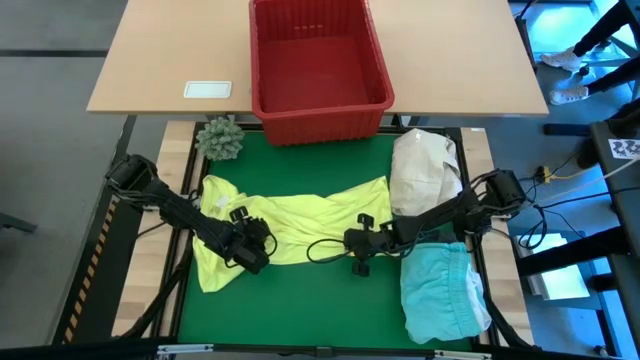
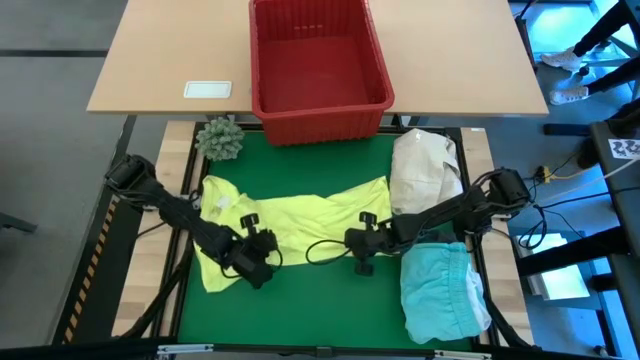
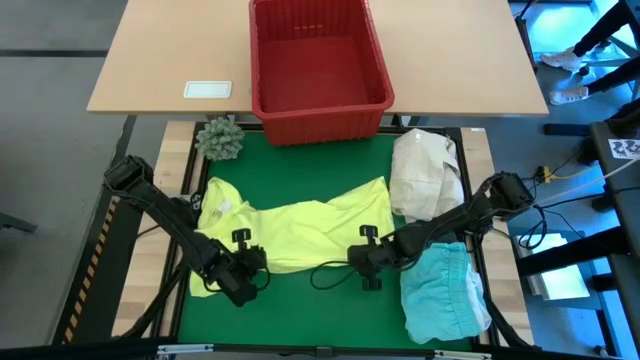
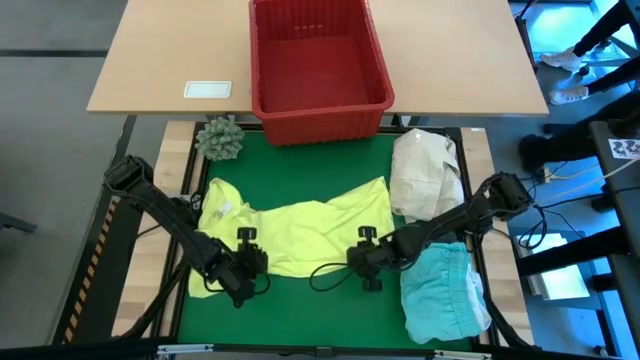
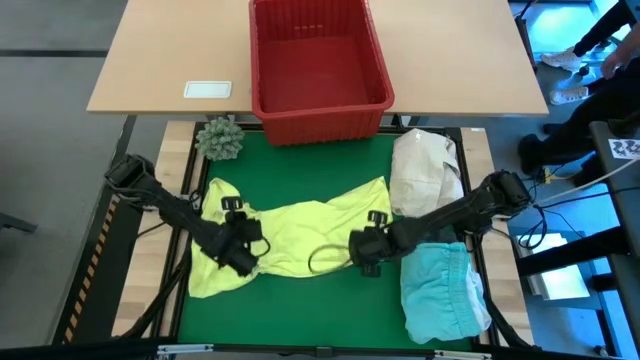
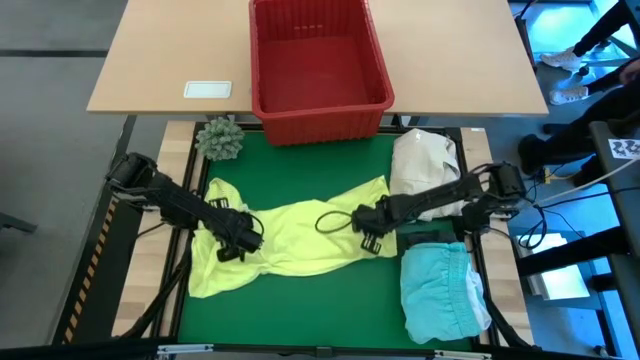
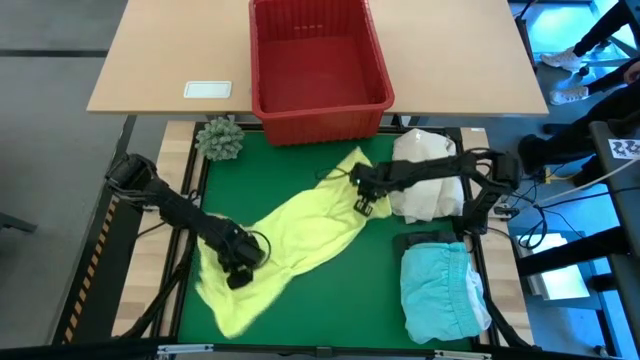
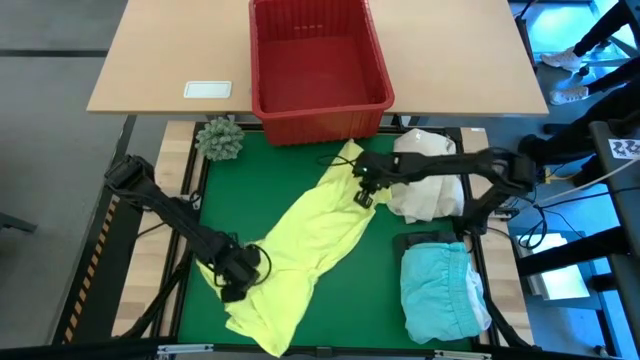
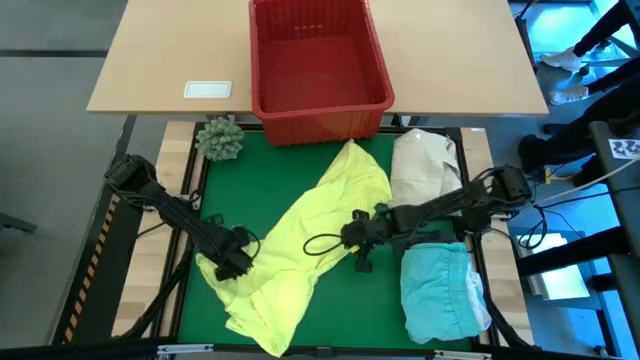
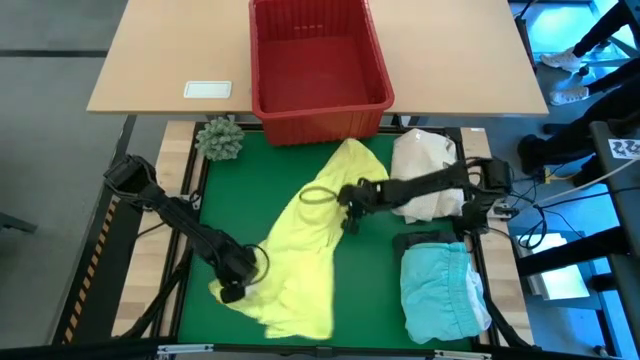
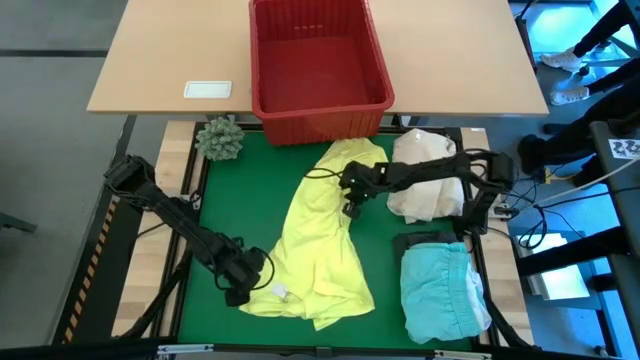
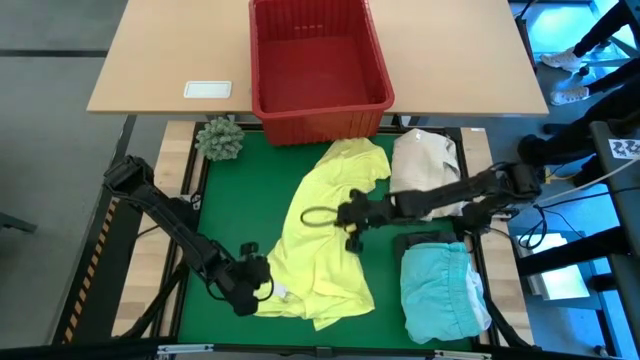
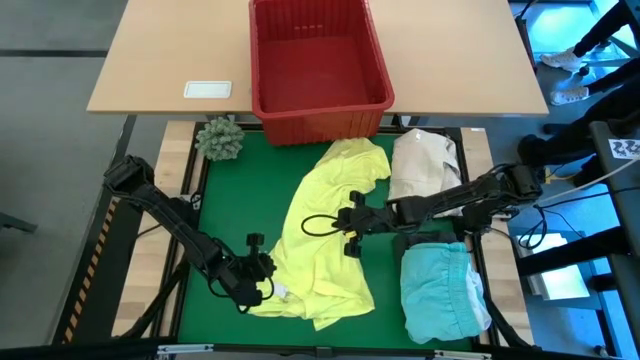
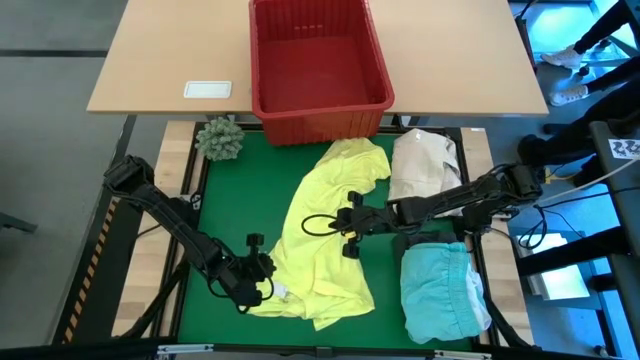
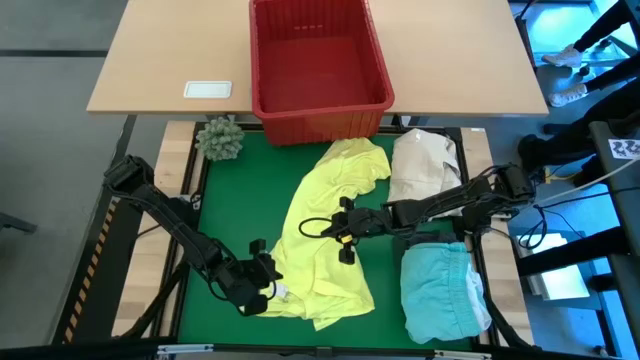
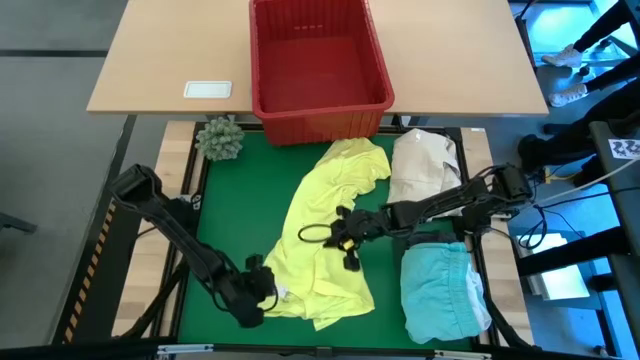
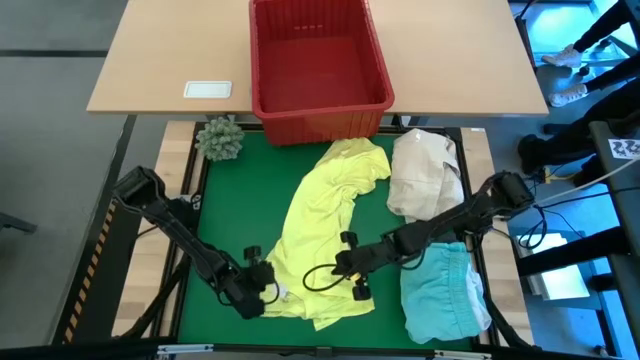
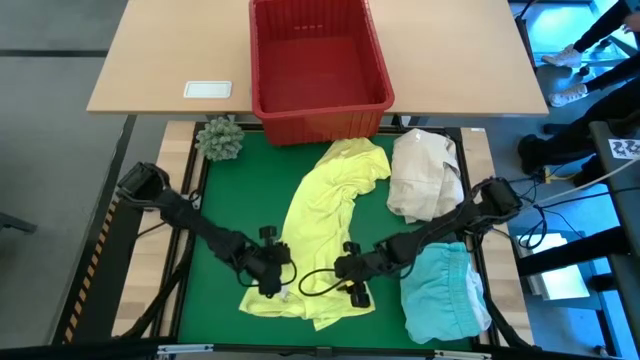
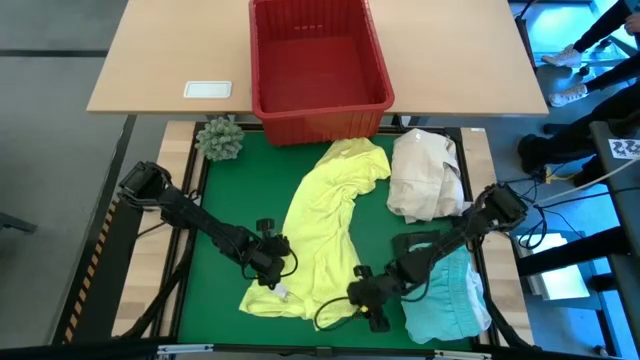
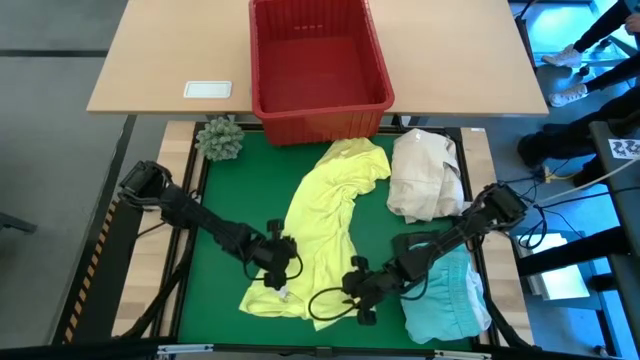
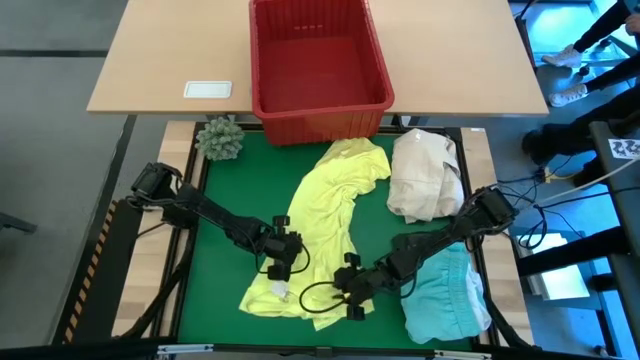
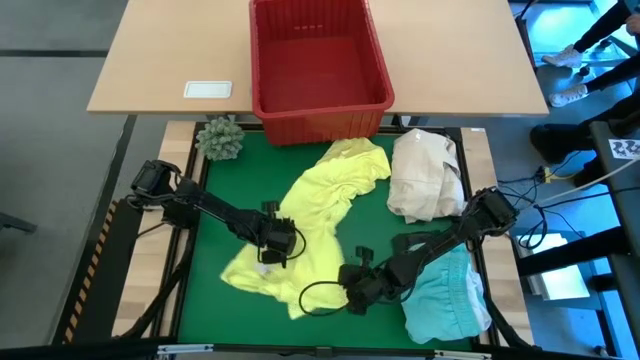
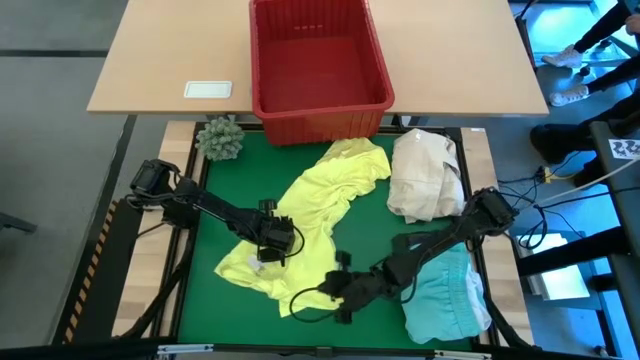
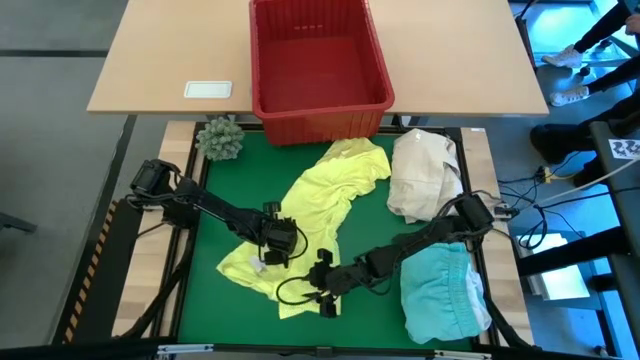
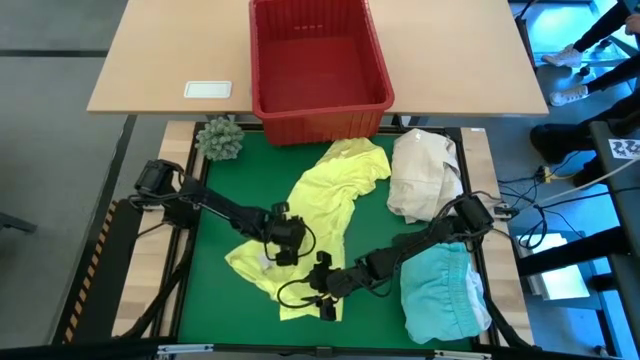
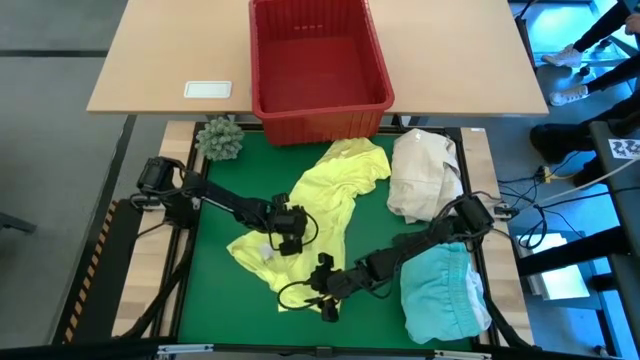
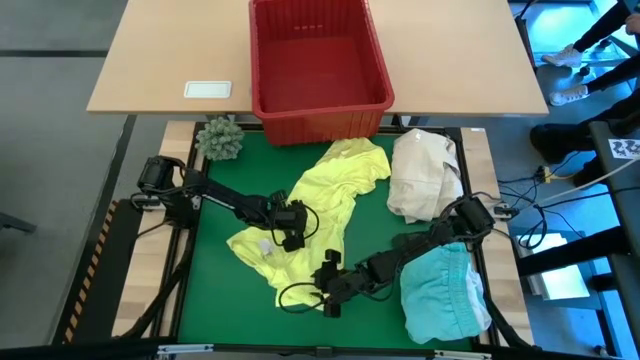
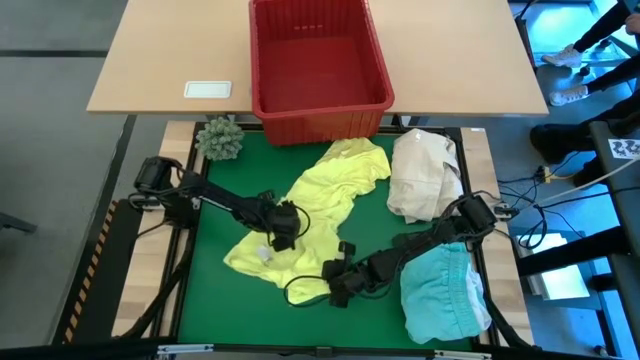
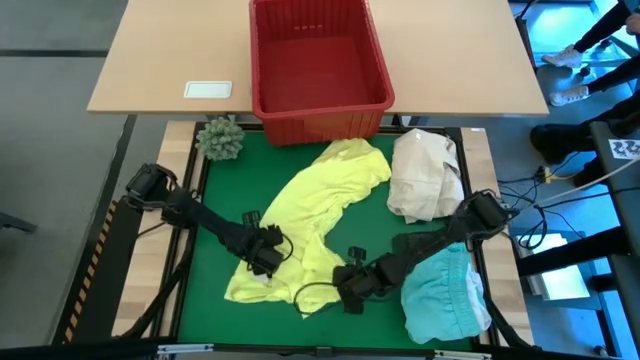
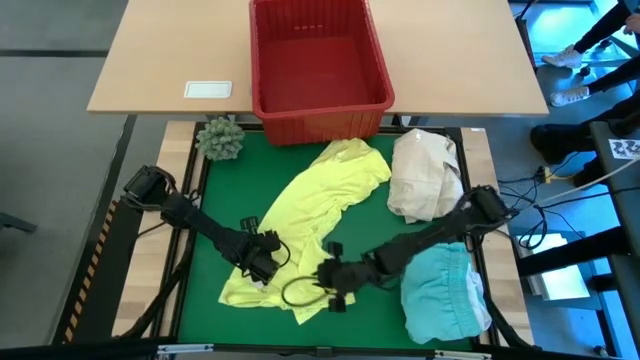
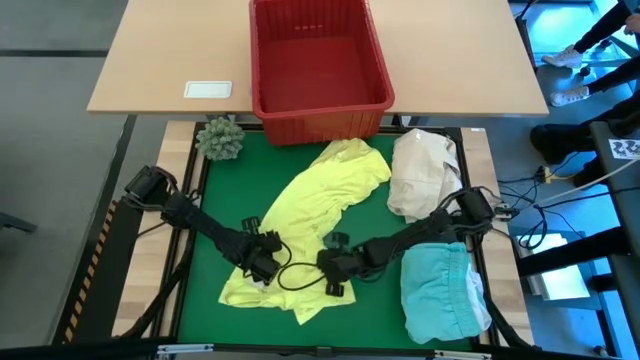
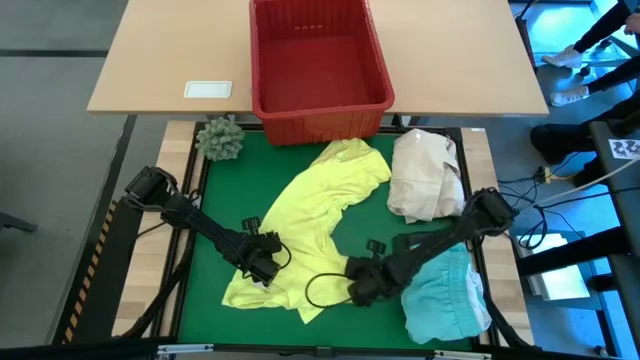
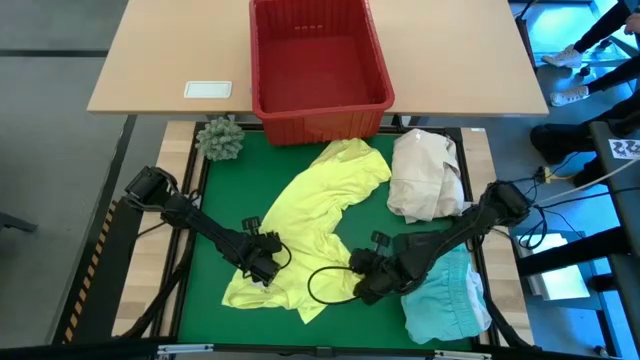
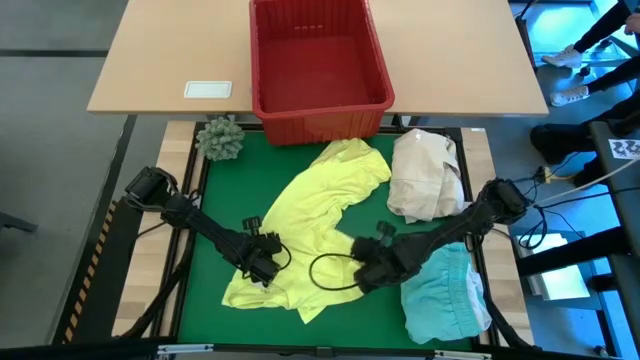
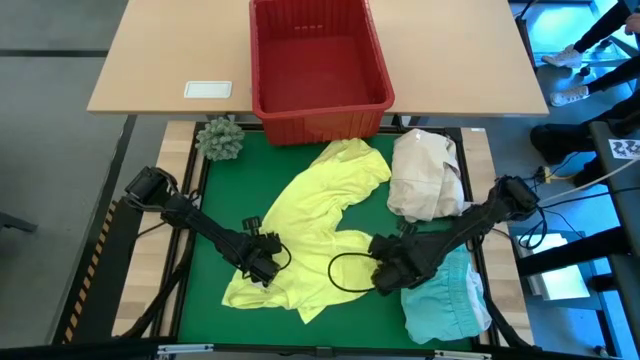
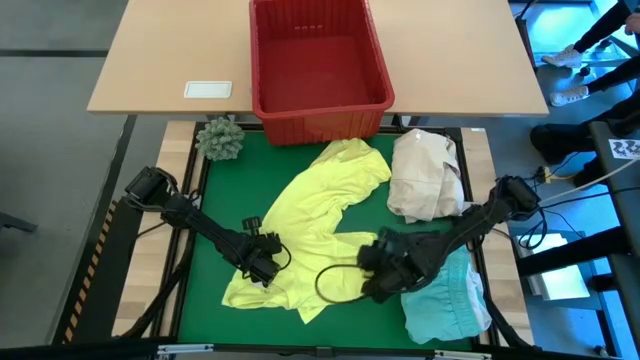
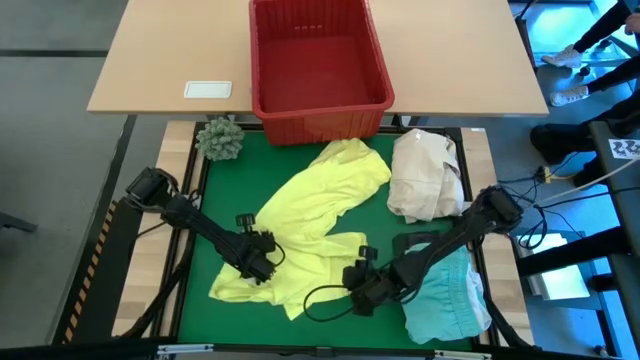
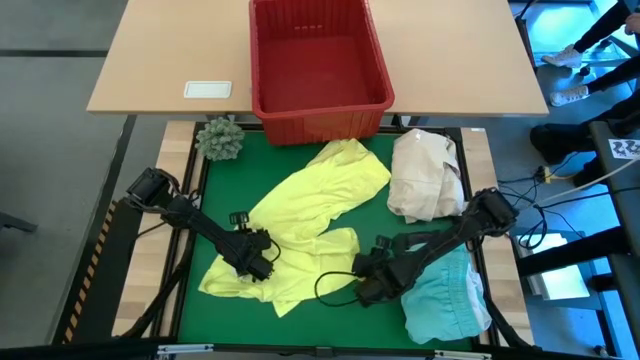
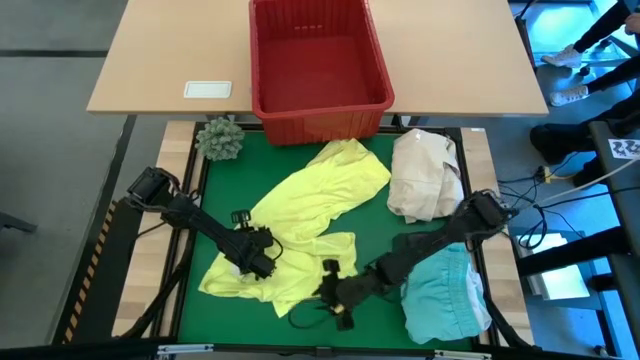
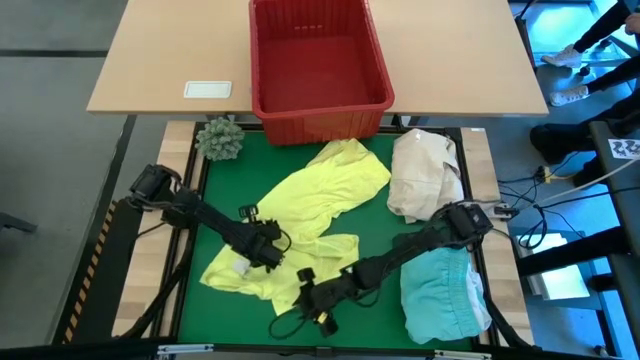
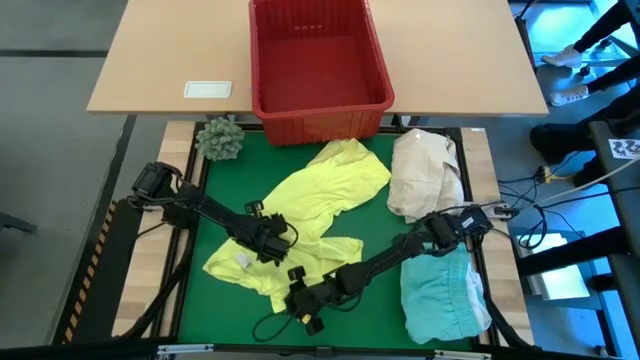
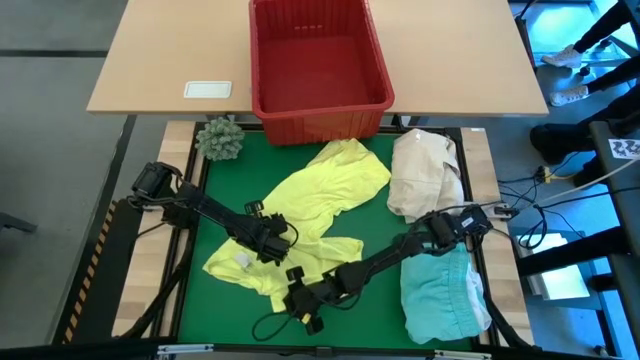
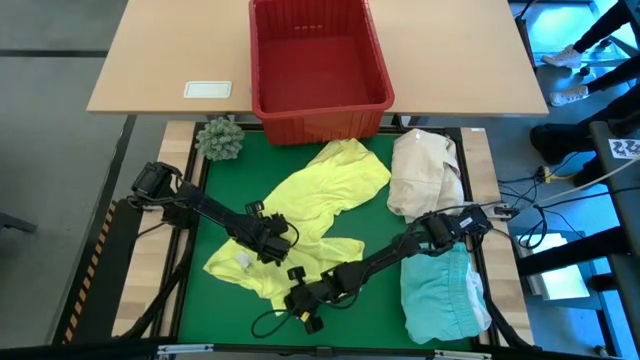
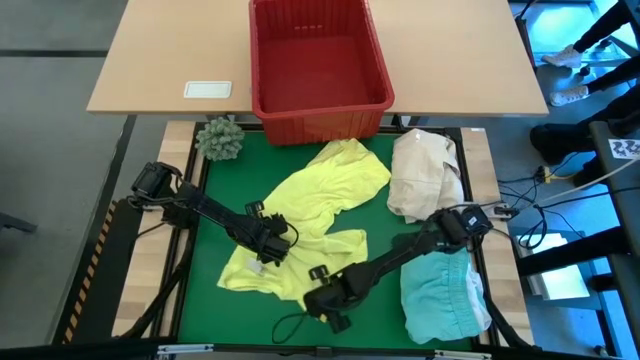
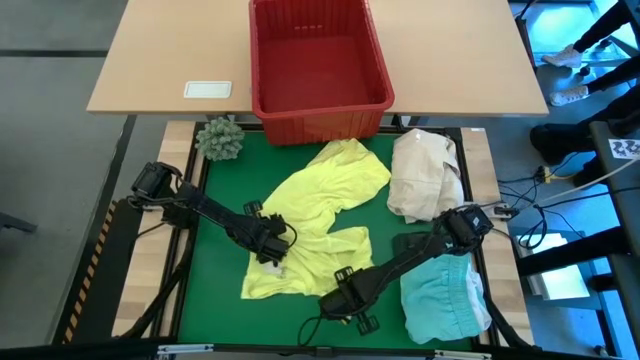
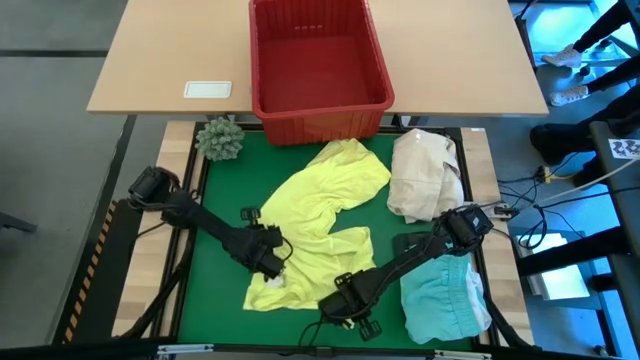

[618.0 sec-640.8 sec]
Task: Fold Laundry from Bin
Fold the yellow shirt
